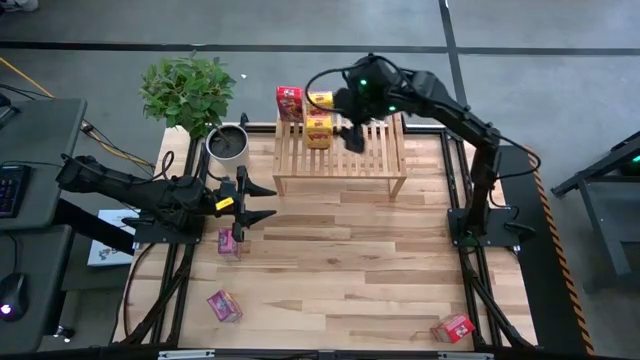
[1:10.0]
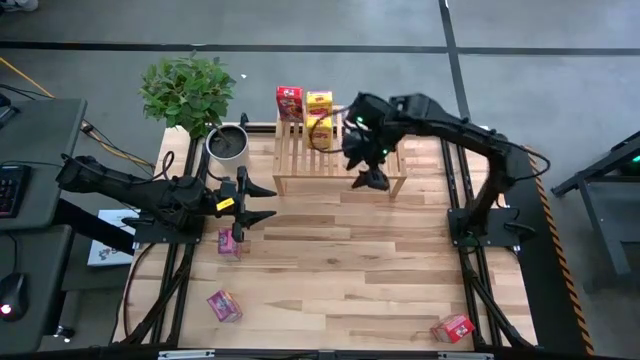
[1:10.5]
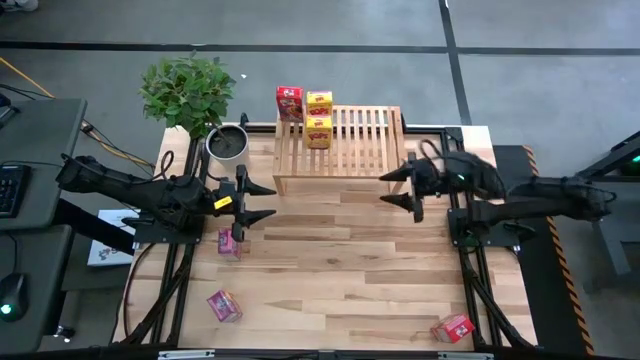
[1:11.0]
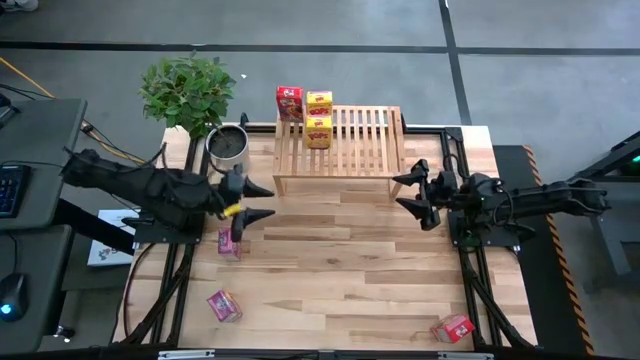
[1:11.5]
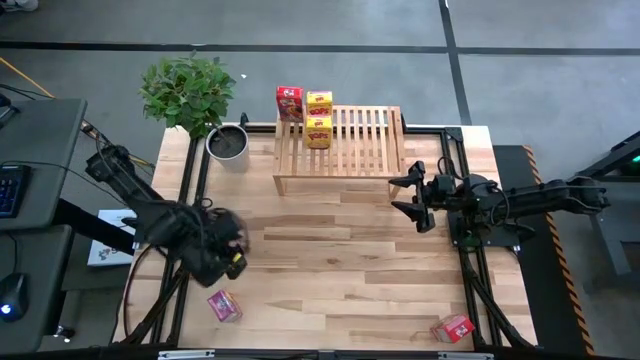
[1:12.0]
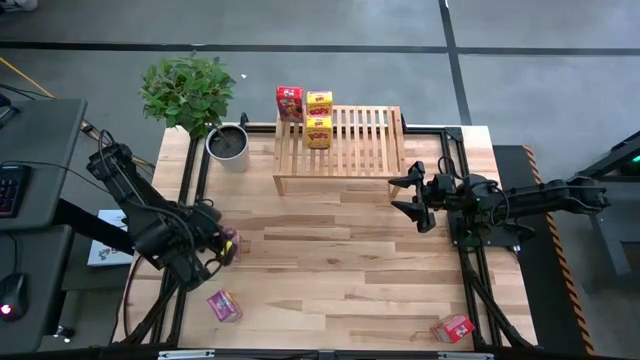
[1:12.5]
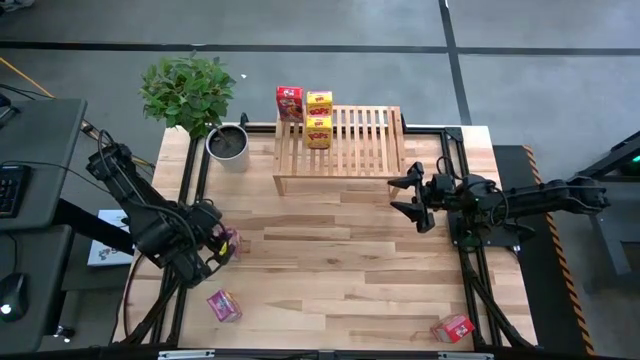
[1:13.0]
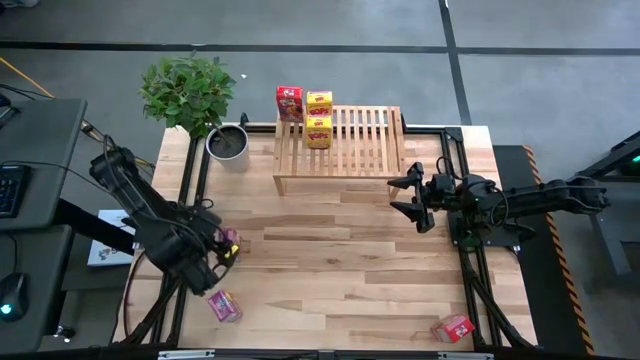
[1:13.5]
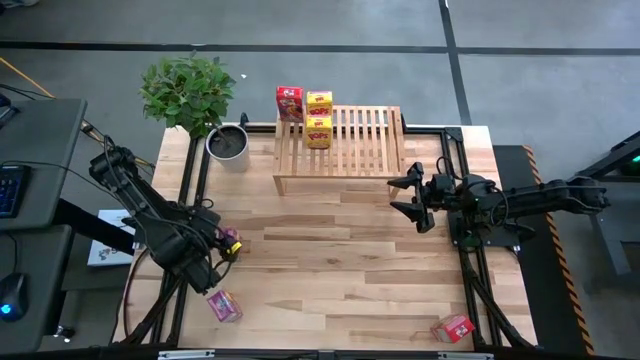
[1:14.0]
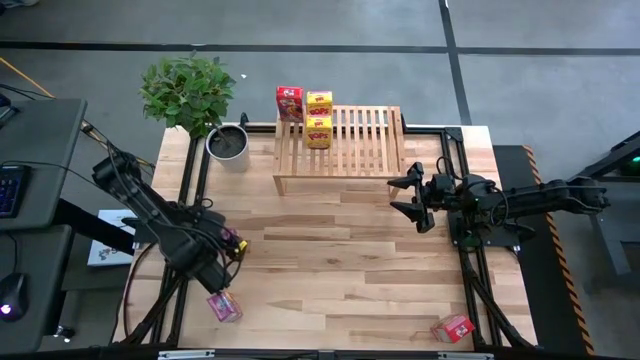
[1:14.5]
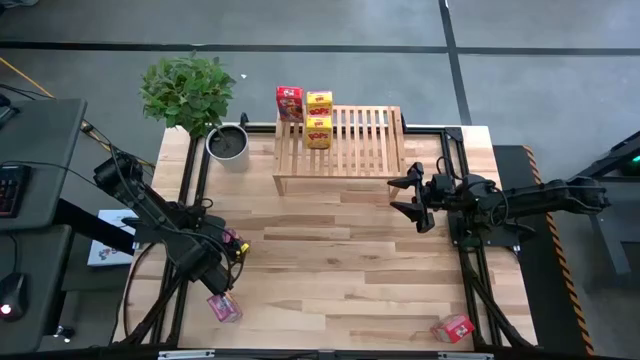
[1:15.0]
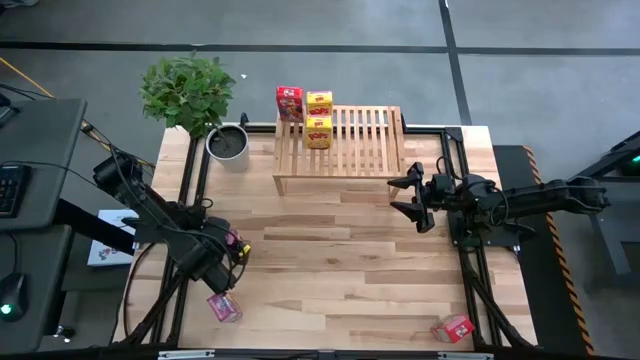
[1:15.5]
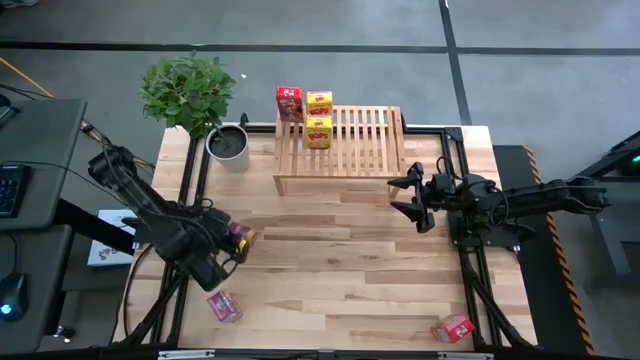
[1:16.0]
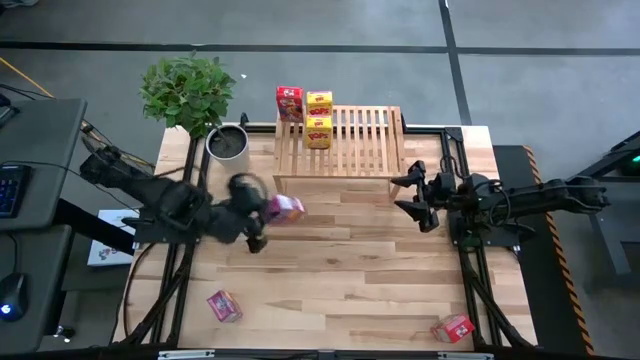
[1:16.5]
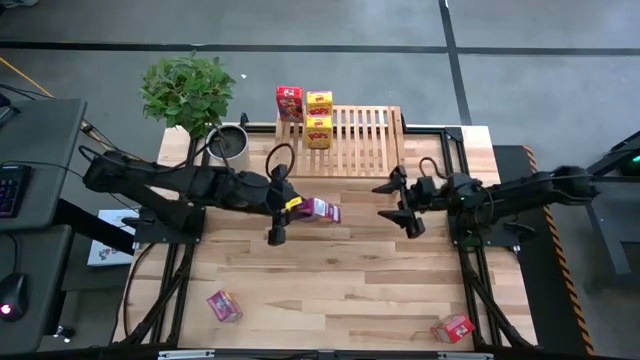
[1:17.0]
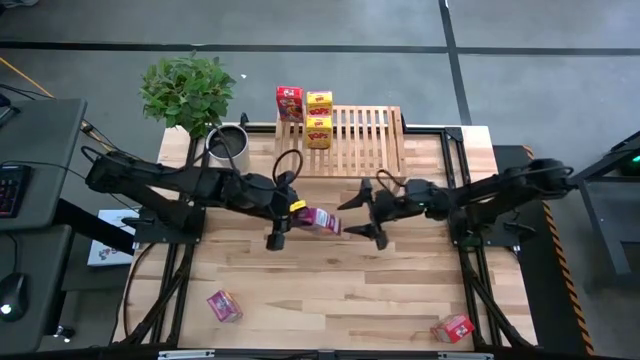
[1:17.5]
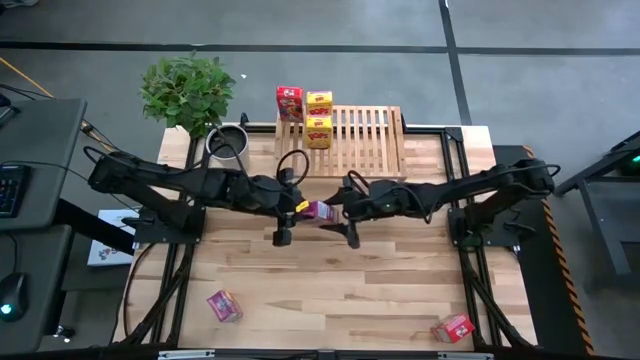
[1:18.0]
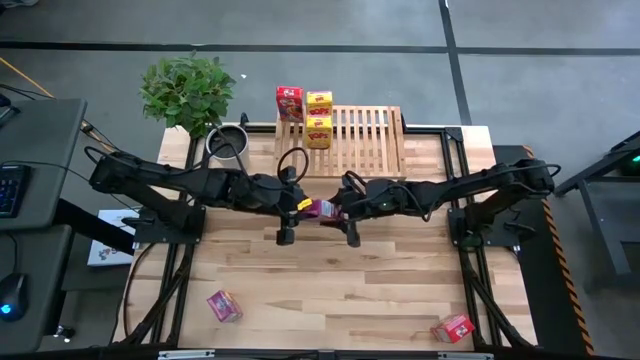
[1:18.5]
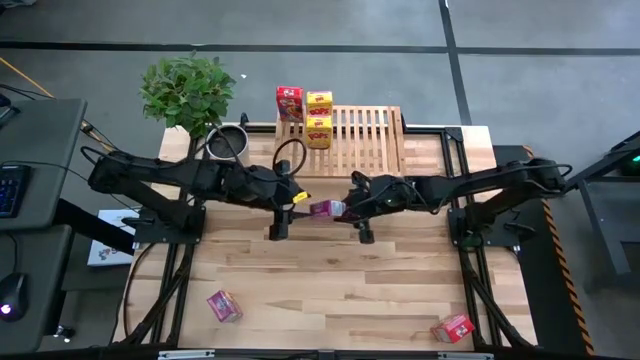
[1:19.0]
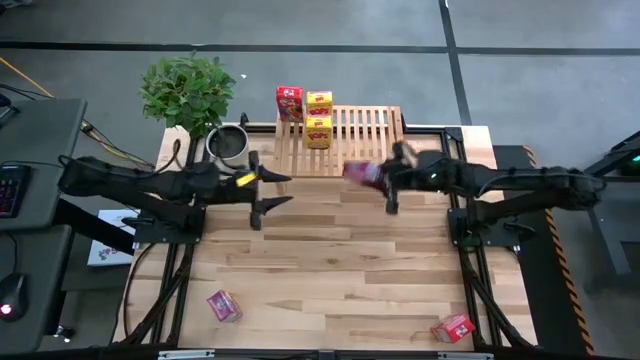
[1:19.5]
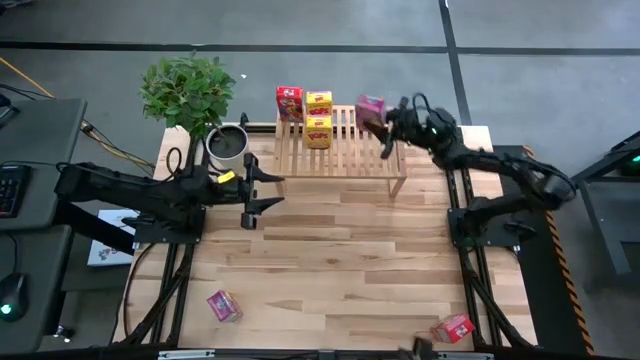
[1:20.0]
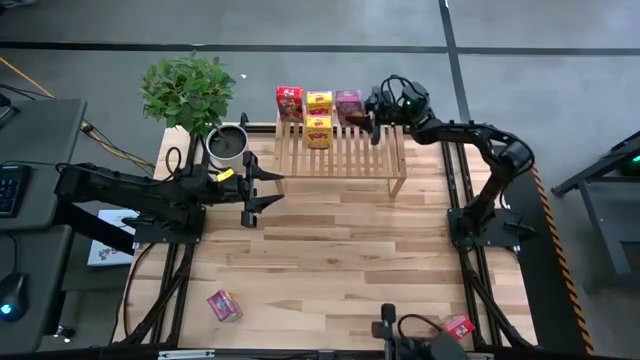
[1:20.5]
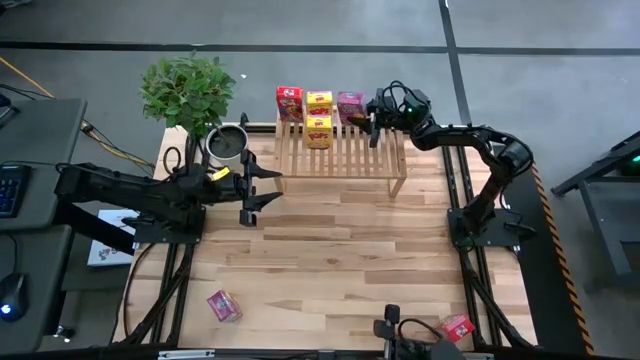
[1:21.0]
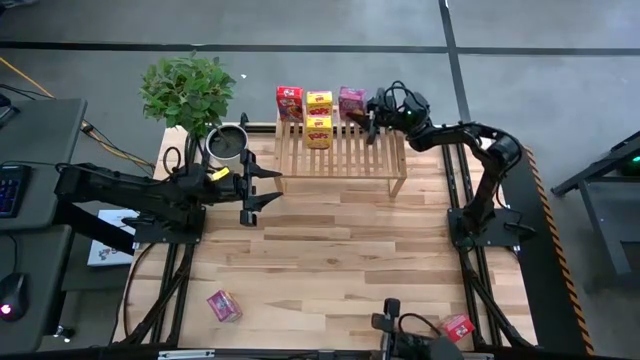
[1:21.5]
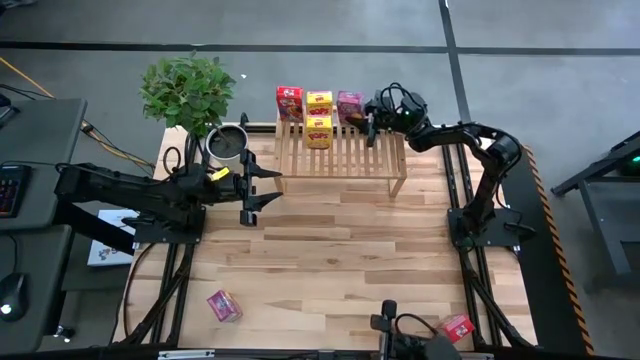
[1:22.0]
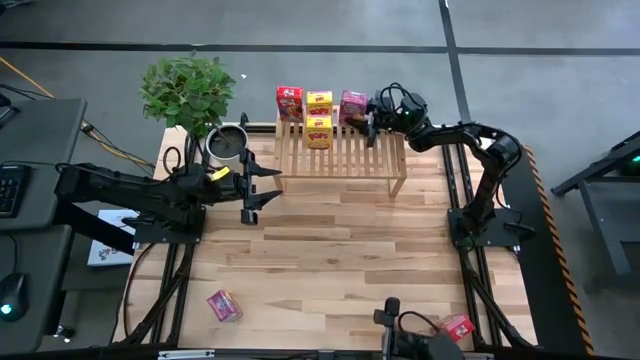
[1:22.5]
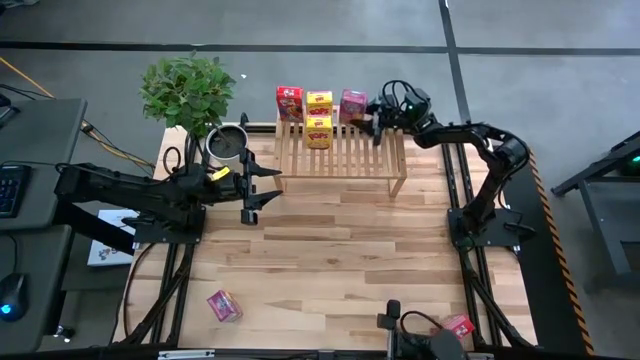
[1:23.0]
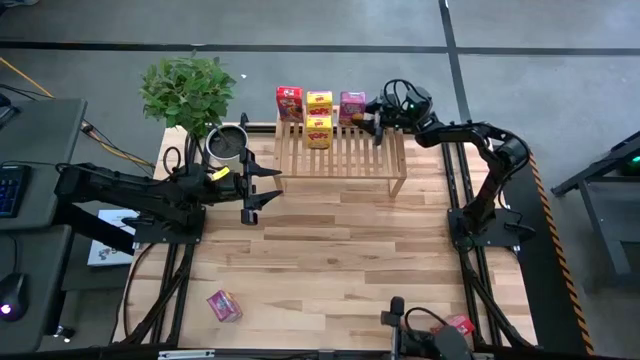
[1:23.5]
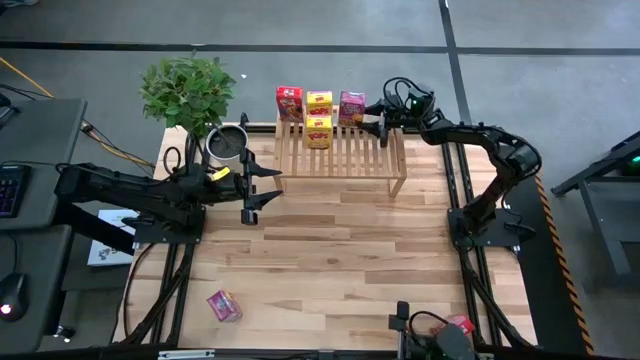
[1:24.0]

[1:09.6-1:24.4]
Task: Stack cereal on shelf
Put the top violet cereal box on the shelf

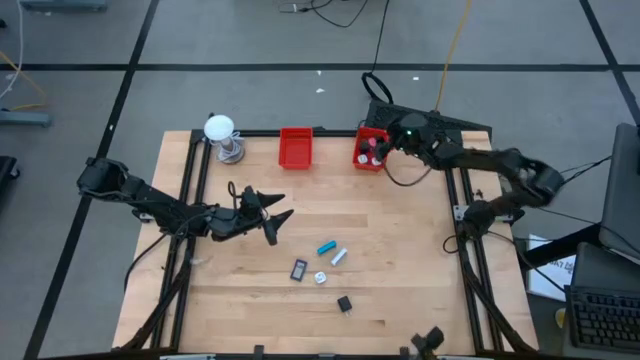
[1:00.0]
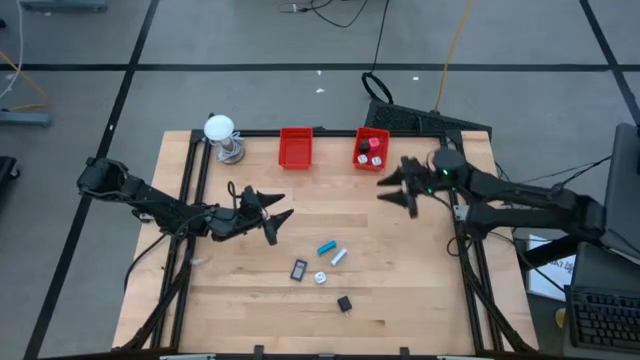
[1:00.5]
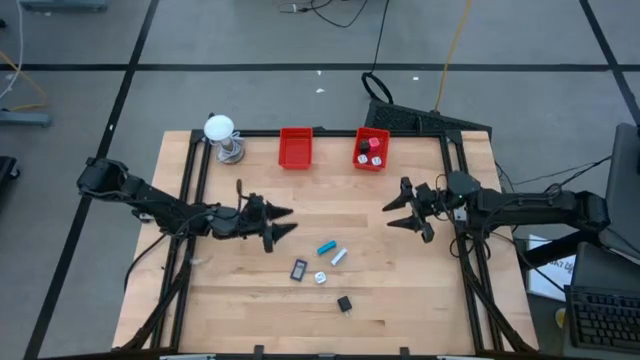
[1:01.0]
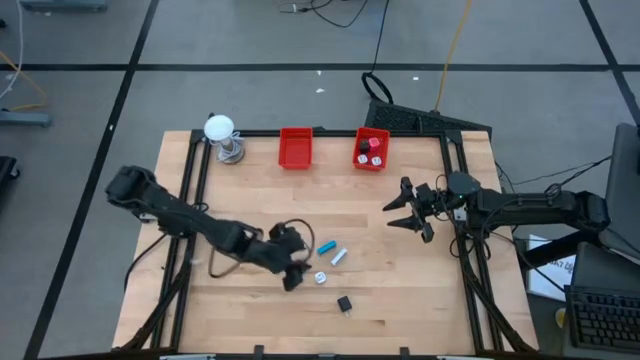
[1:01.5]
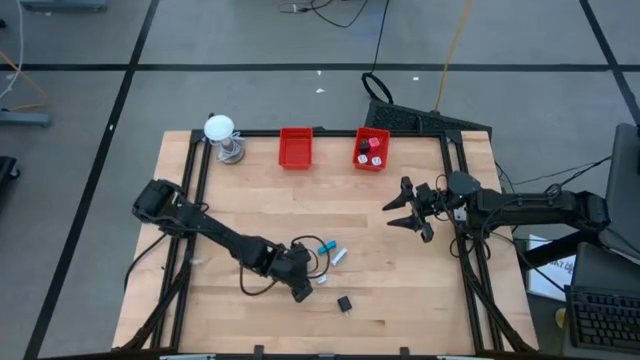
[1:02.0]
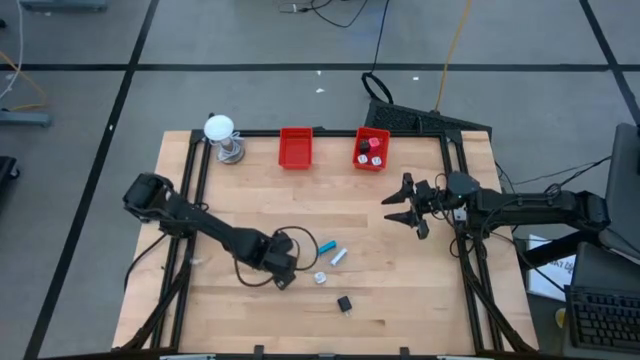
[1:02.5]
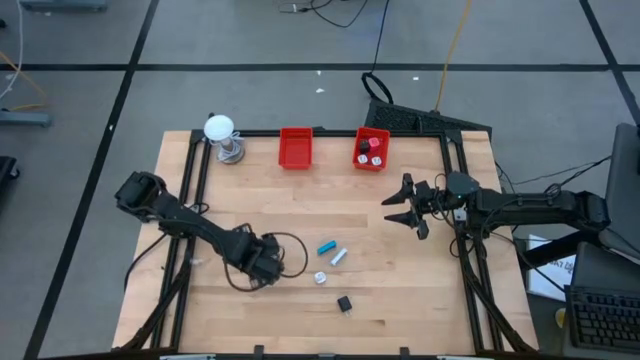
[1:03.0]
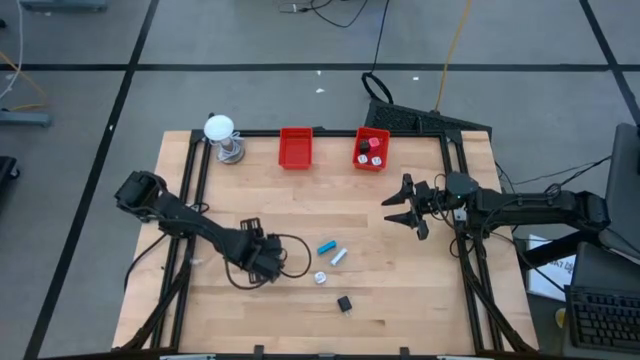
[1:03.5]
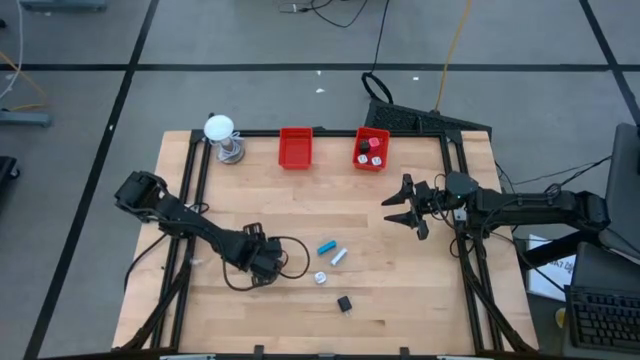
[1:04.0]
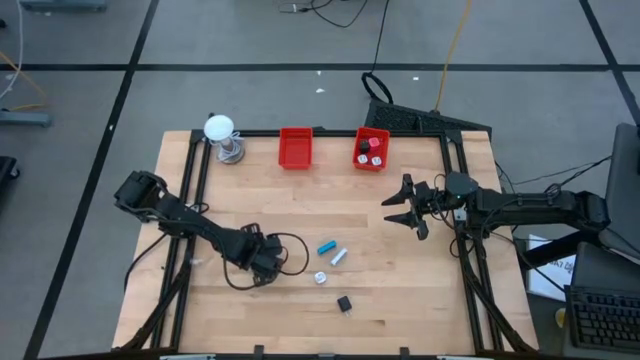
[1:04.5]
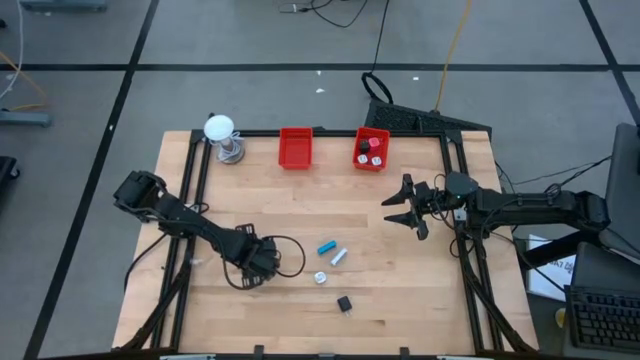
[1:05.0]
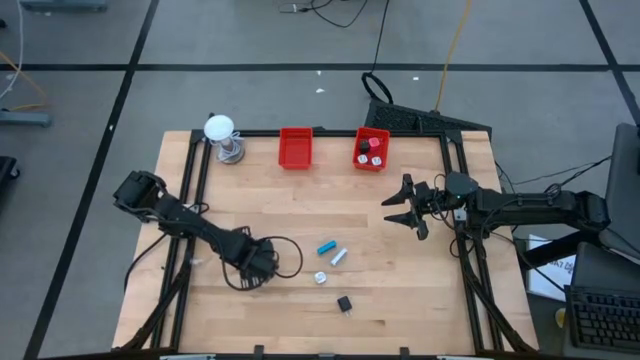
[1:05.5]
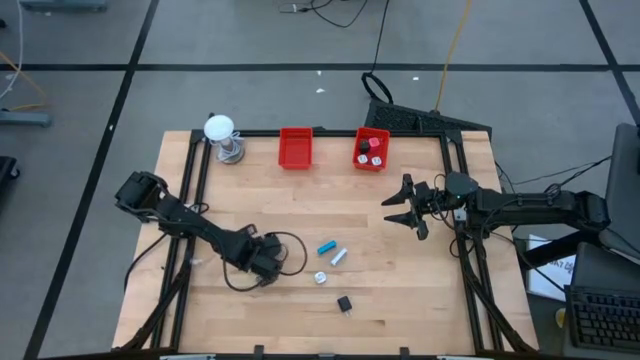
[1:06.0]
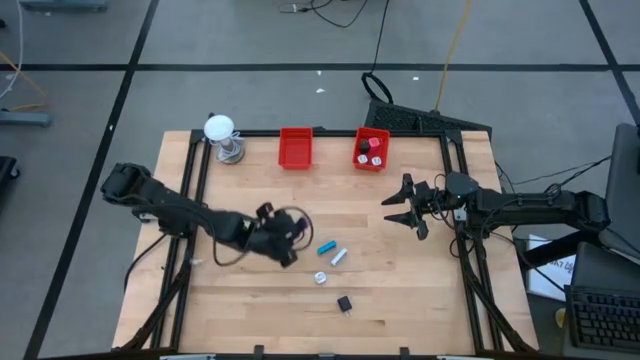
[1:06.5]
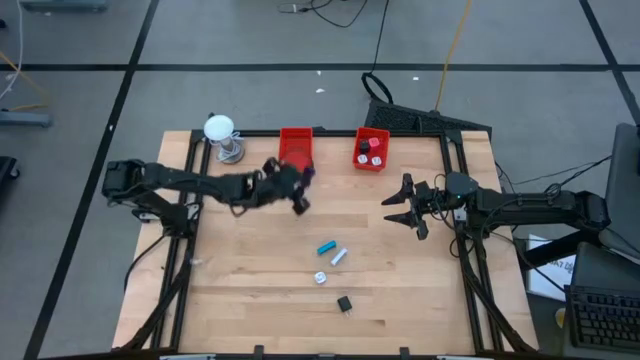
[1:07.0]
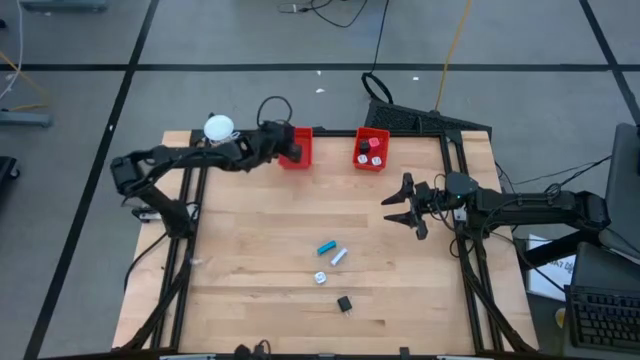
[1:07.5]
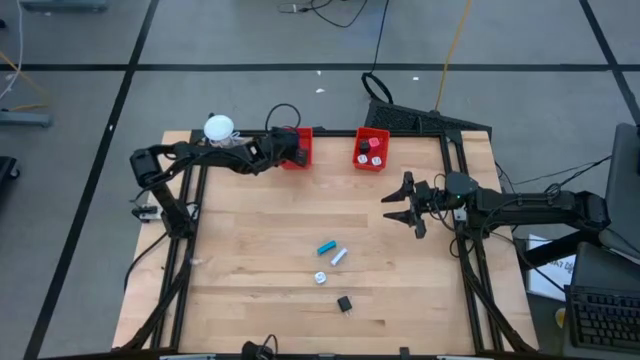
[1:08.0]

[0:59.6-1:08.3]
Task: Pick & Place Office items
Put the dark blue digital timer into the left red basket
